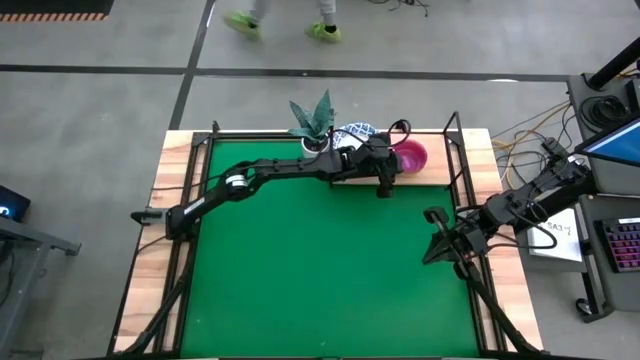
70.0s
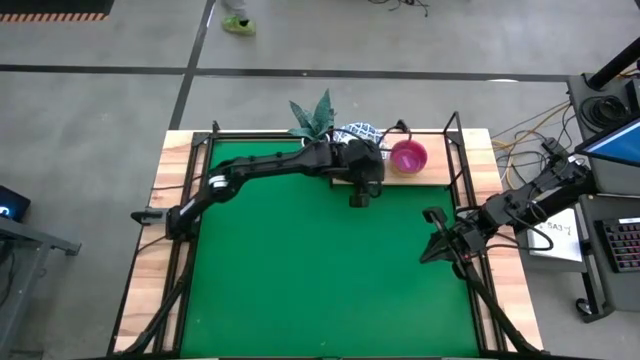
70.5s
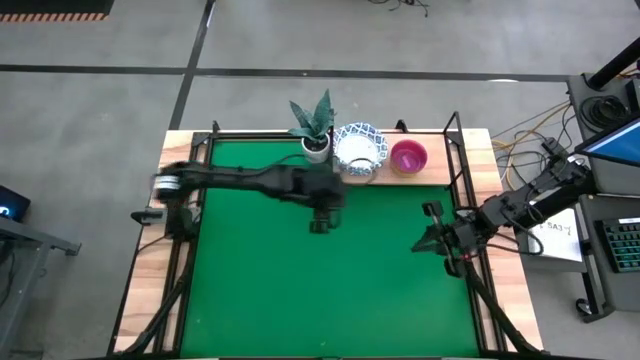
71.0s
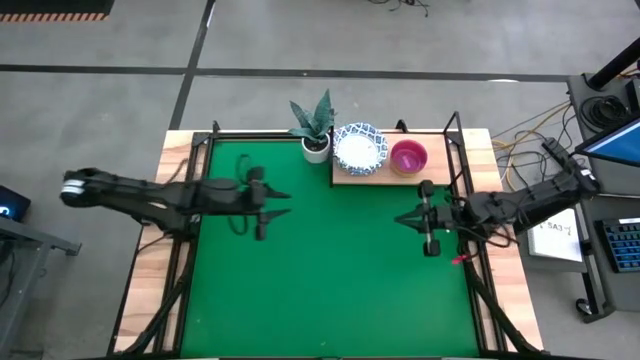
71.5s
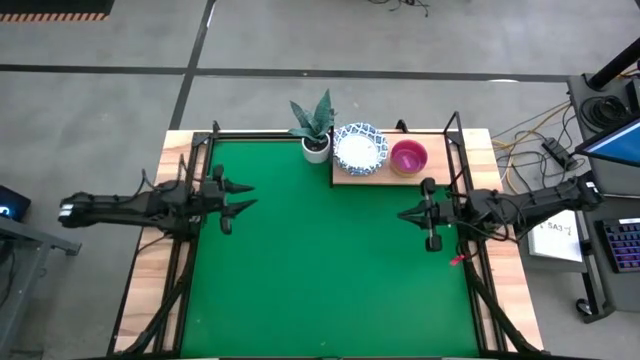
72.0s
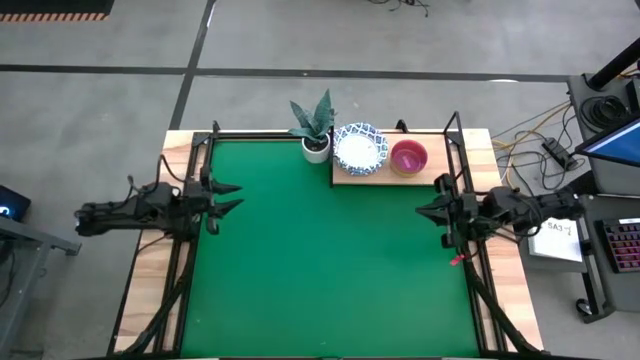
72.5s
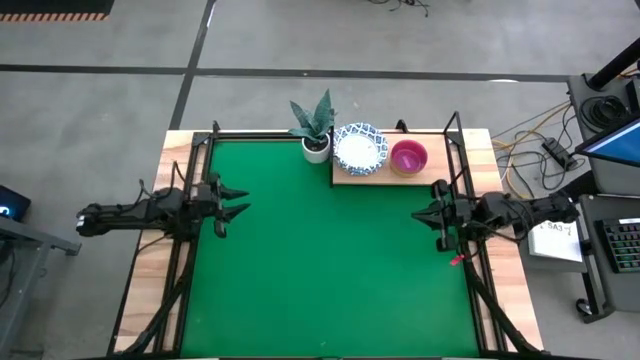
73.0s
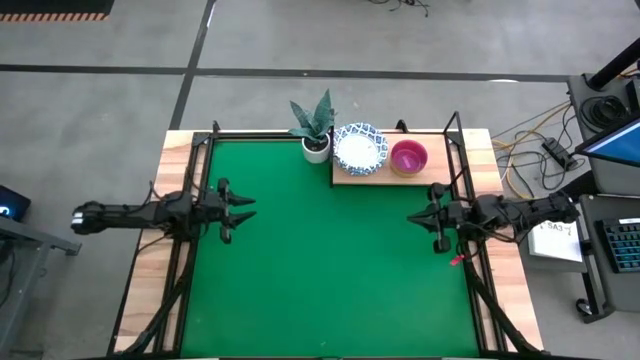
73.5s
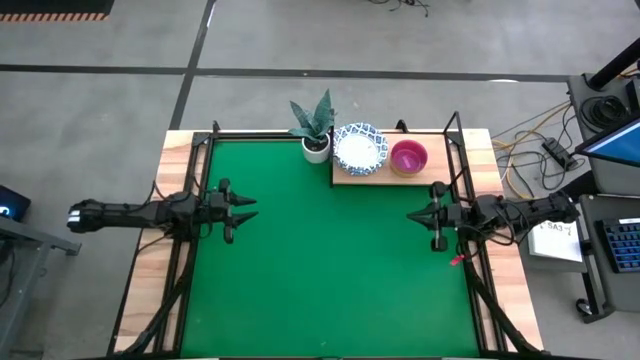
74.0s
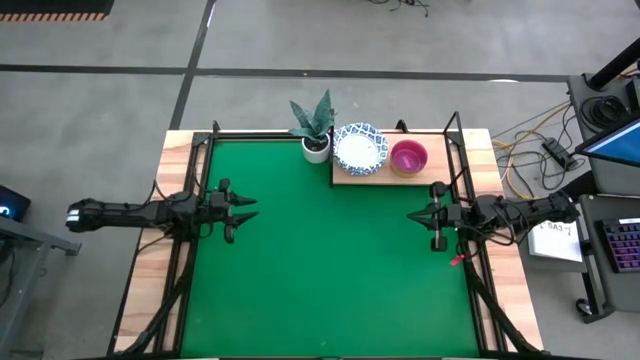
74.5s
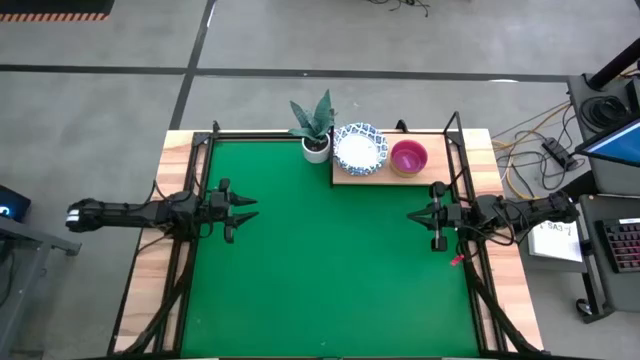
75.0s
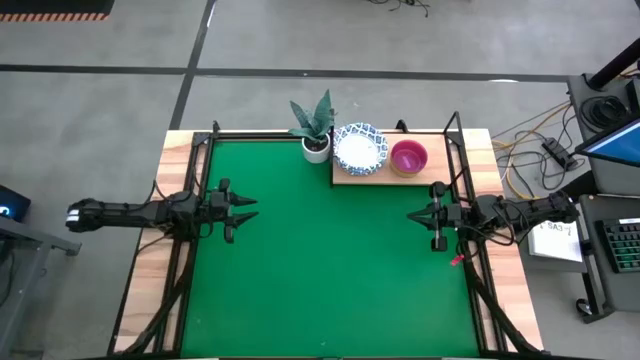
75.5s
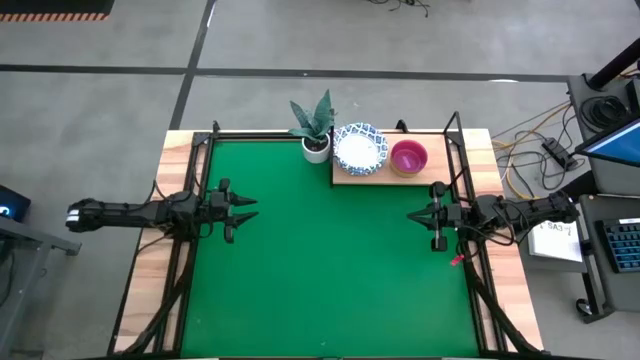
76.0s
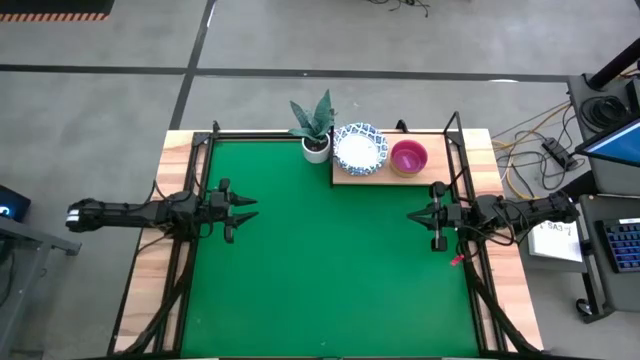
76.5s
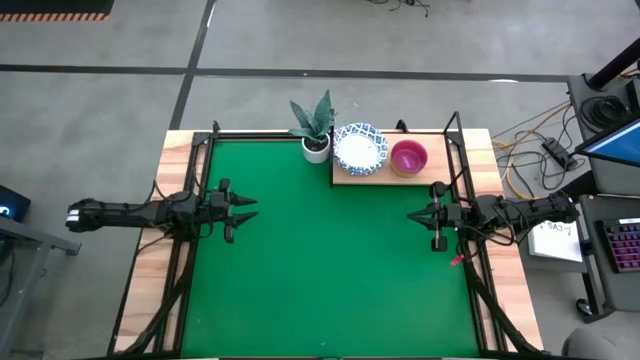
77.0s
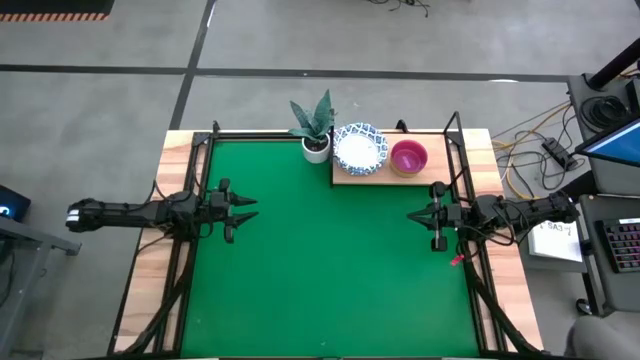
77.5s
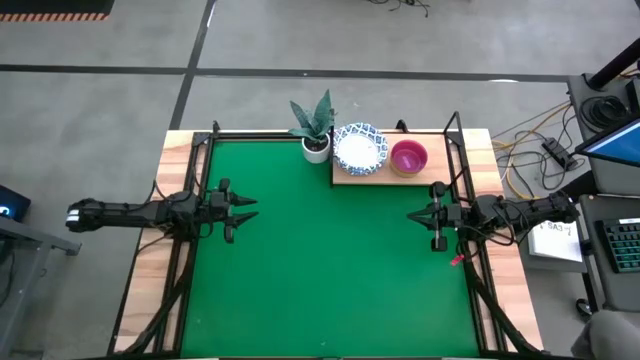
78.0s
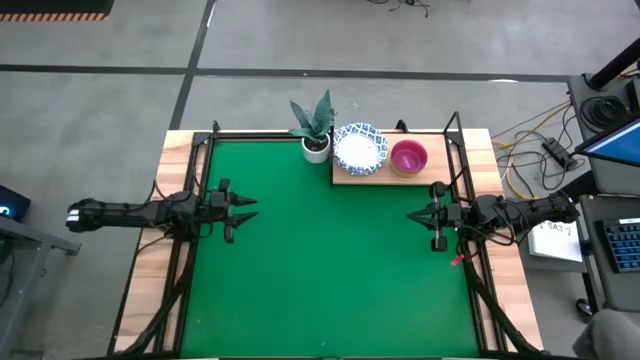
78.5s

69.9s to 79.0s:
Task: Place and stack bowls onto a shelf
Return to Home Position

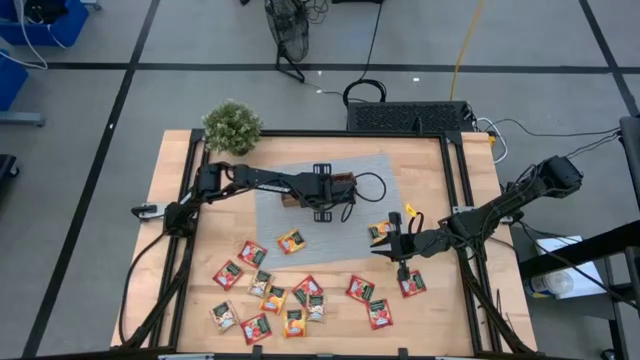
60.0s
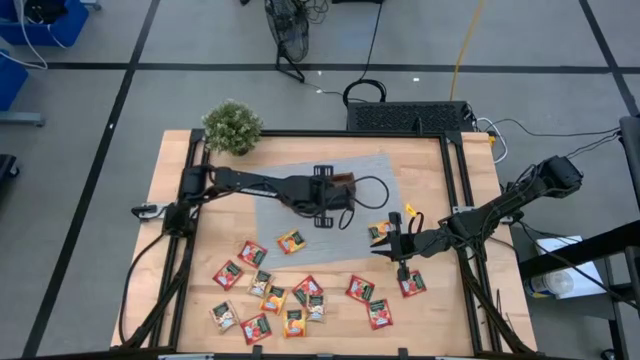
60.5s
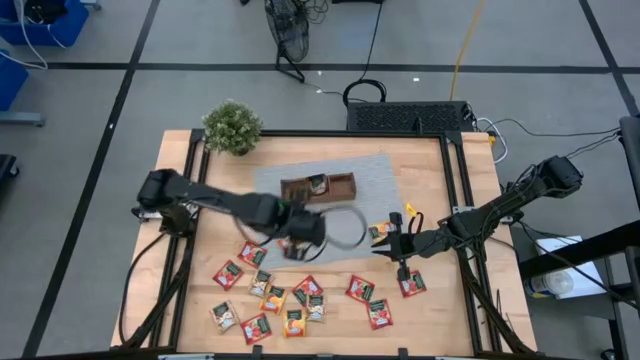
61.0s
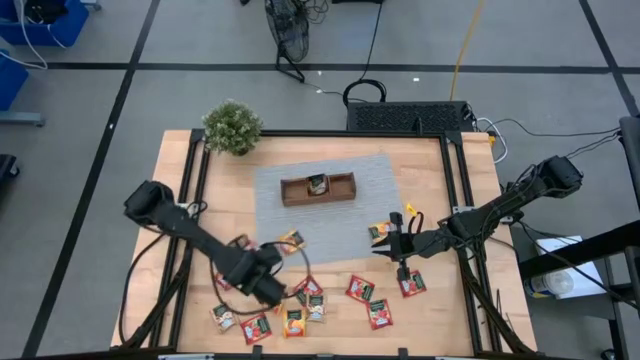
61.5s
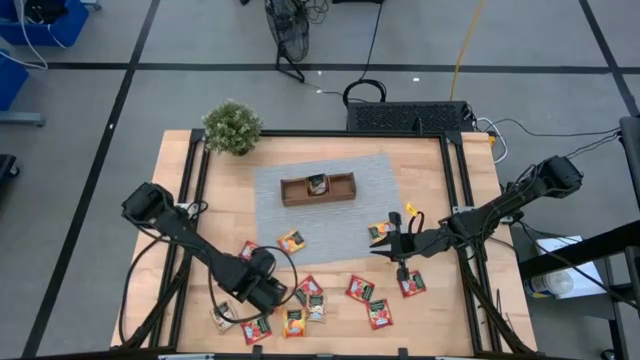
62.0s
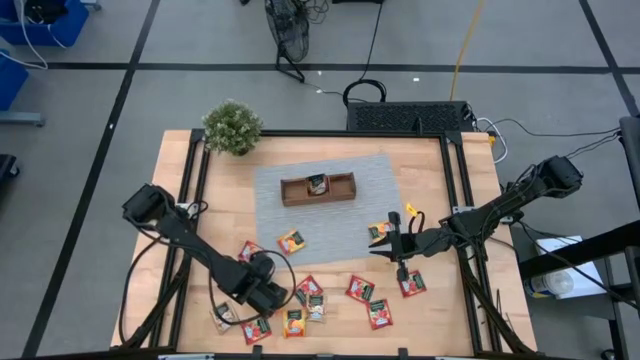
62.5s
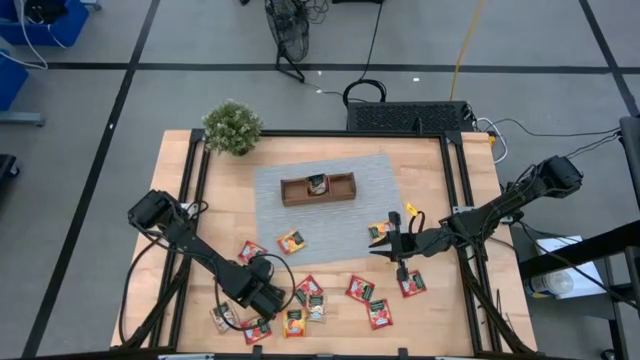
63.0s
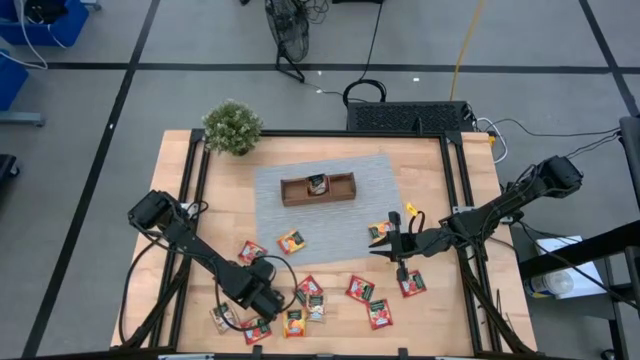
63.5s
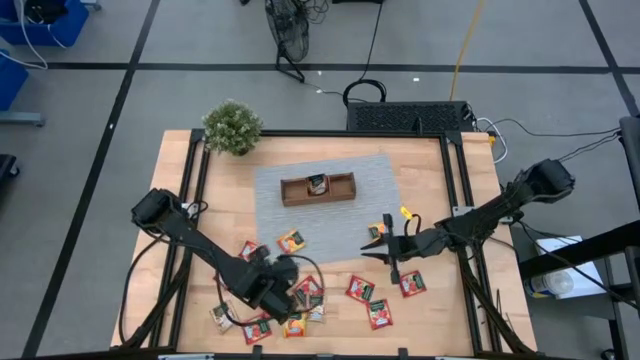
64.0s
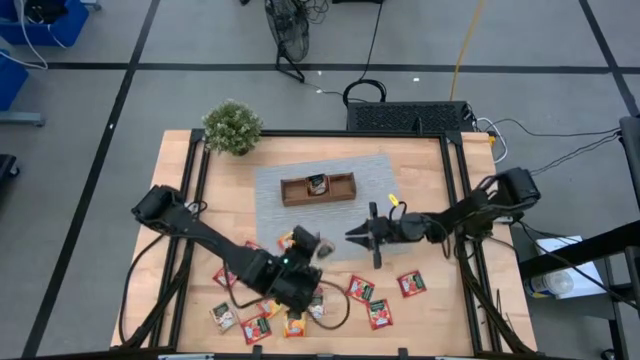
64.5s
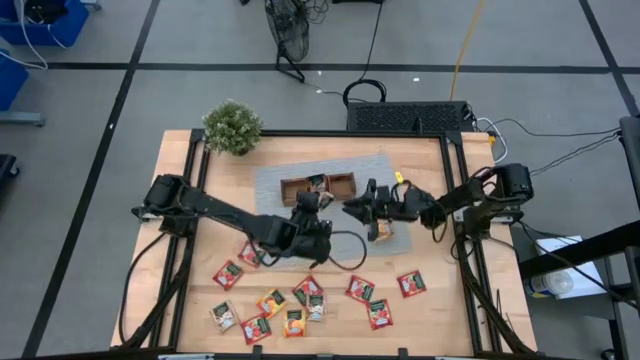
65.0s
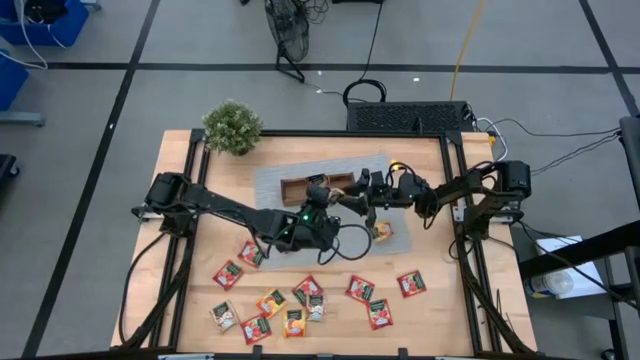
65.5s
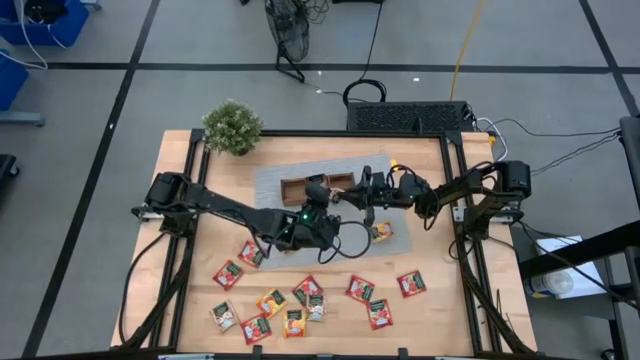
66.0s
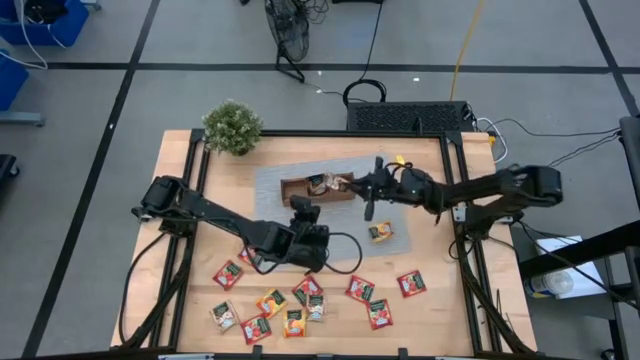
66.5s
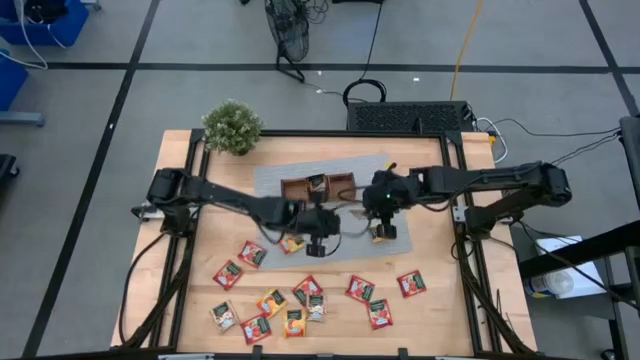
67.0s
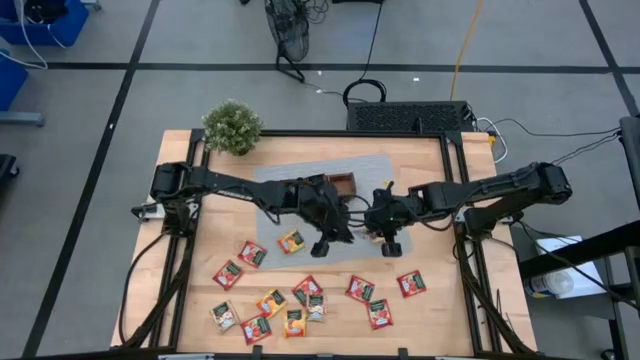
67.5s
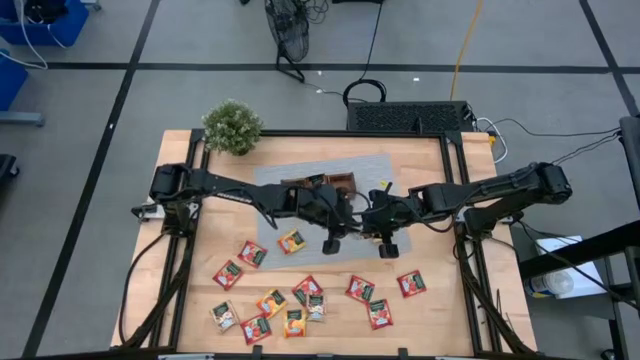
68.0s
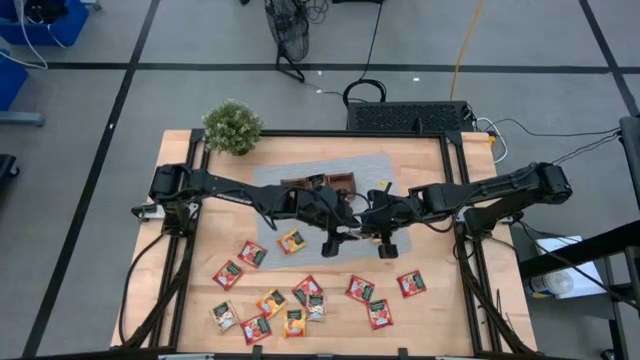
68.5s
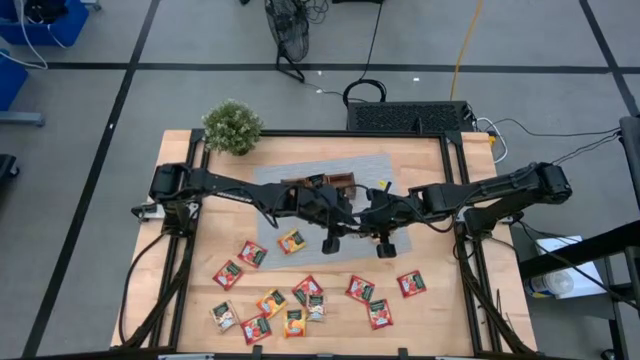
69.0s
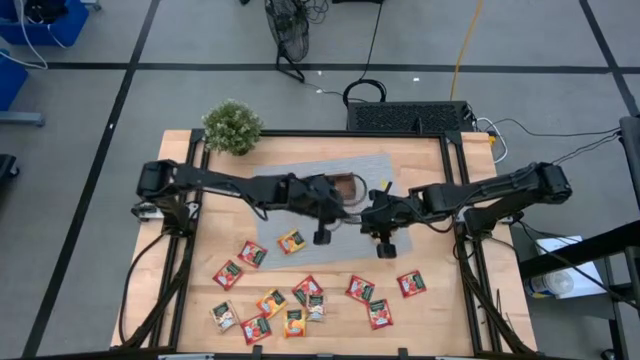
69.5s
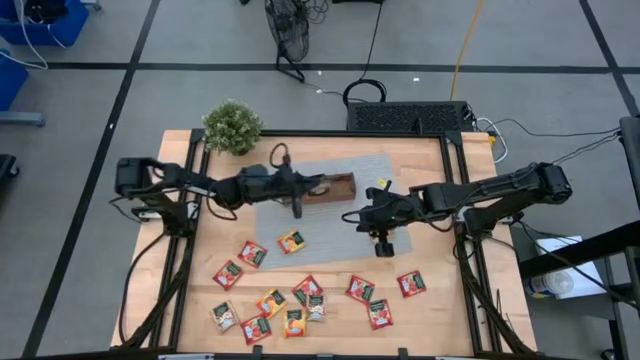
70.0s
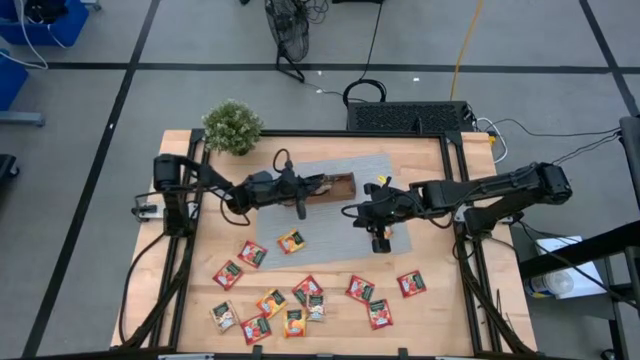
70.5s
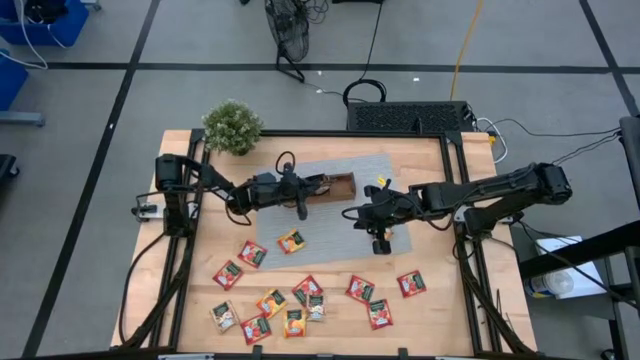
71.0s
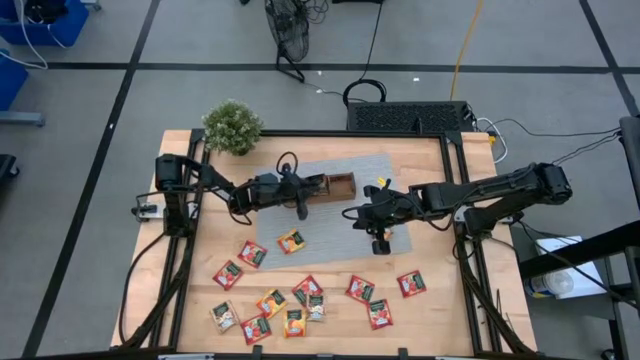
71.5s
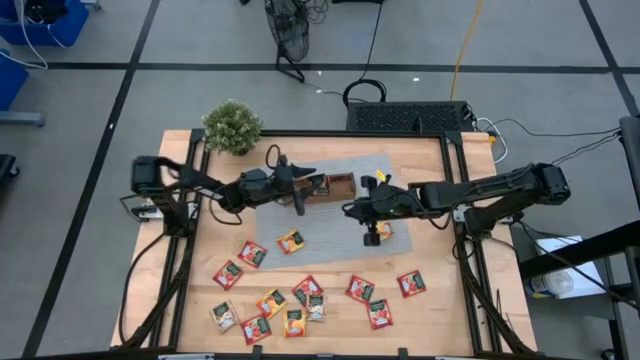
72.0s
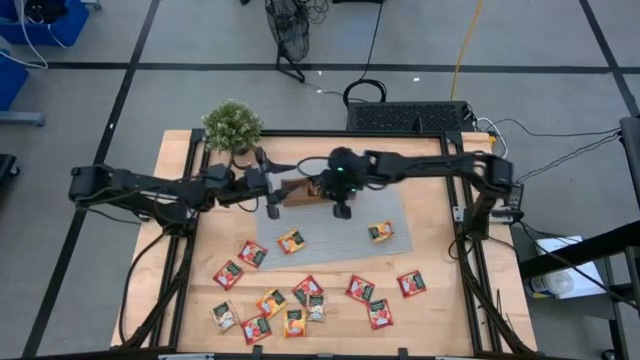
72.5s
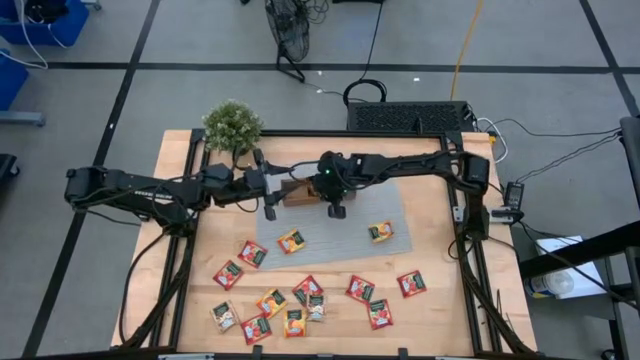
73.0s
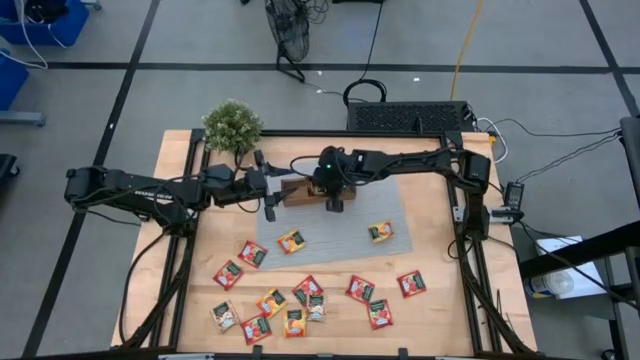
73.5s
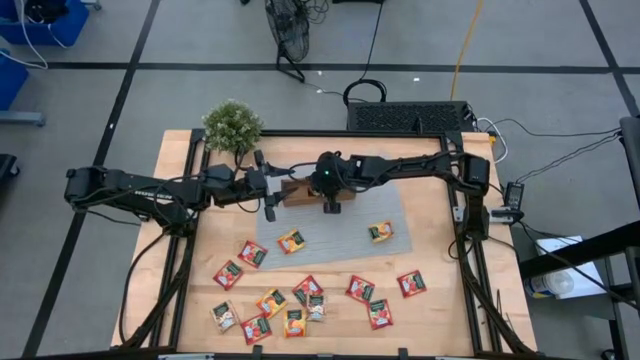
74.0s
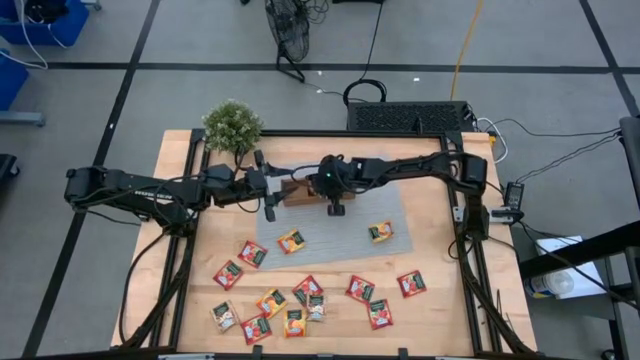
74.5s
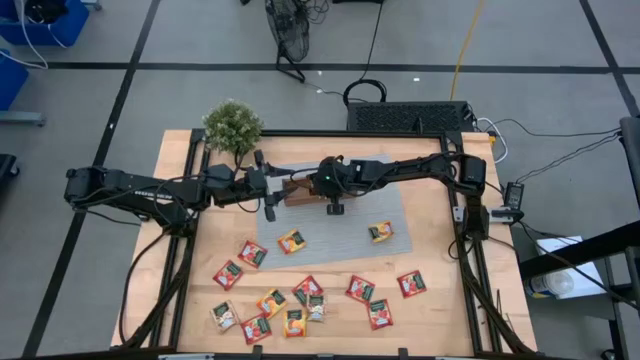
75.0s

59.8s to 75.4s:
Task: Pick & Place Tea
Put the brown tea bag into the middle section of the wooden organizer
